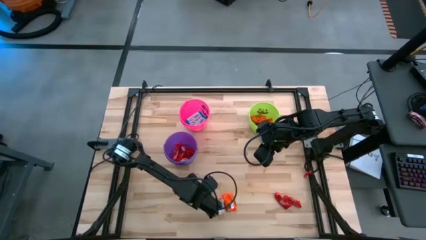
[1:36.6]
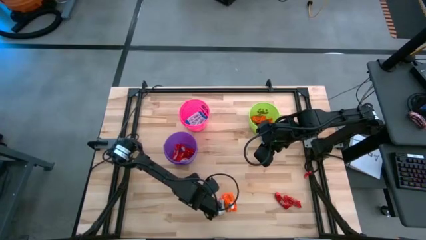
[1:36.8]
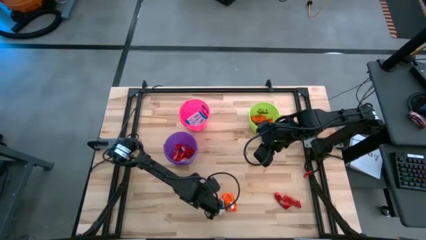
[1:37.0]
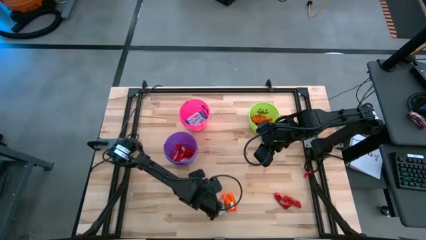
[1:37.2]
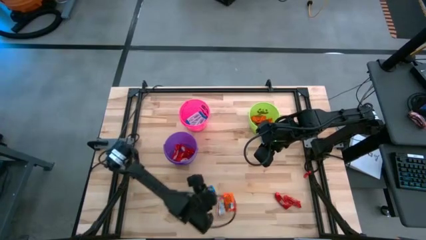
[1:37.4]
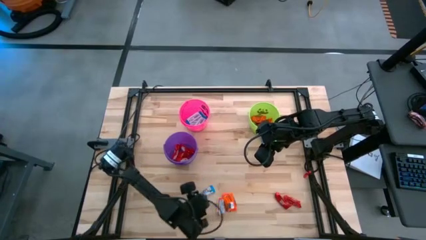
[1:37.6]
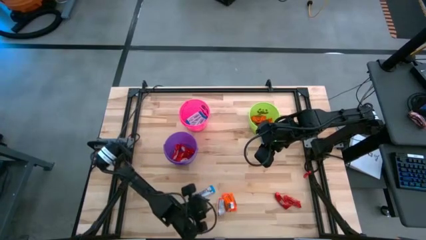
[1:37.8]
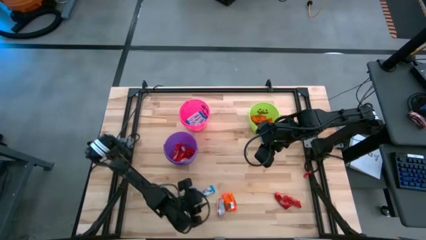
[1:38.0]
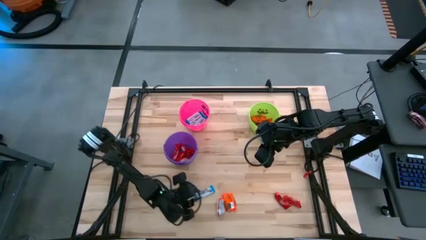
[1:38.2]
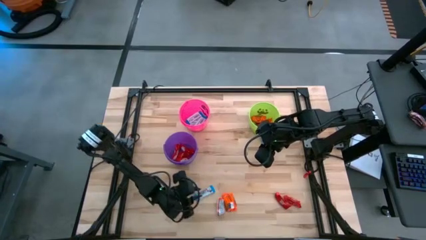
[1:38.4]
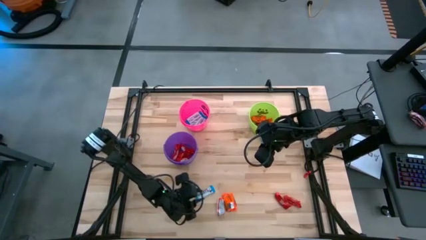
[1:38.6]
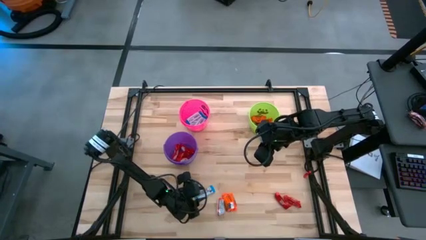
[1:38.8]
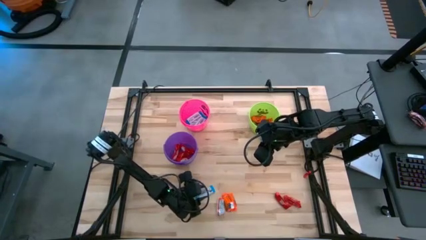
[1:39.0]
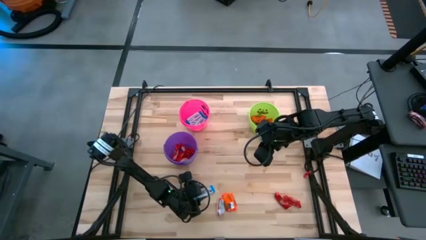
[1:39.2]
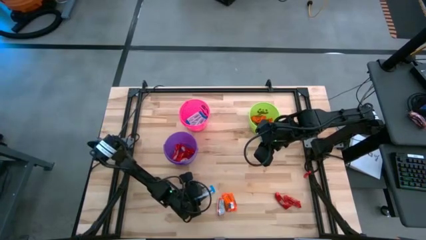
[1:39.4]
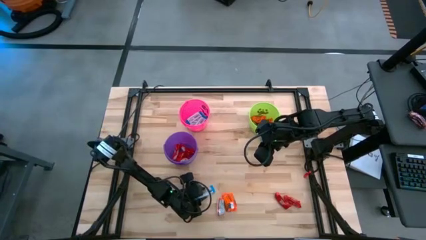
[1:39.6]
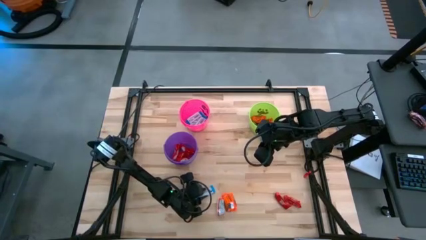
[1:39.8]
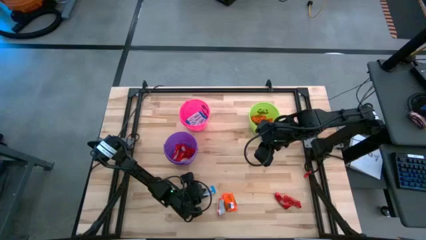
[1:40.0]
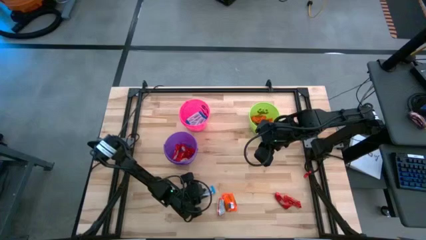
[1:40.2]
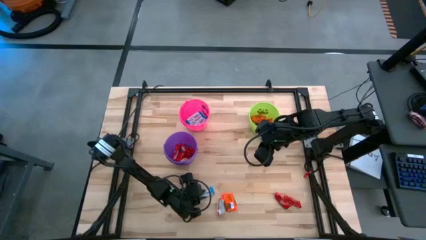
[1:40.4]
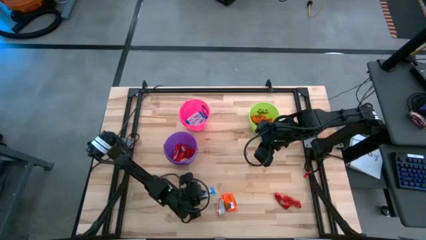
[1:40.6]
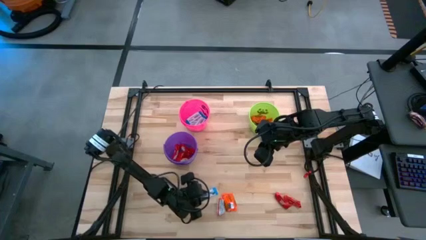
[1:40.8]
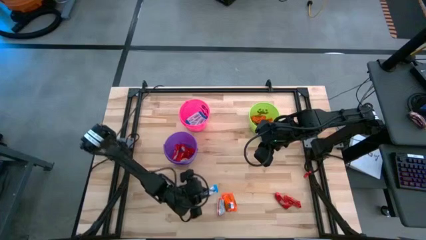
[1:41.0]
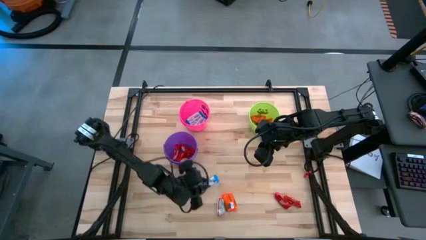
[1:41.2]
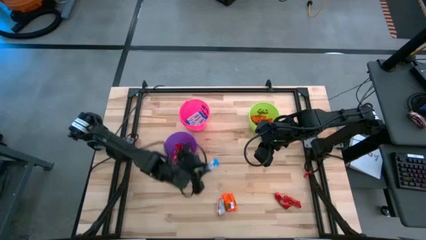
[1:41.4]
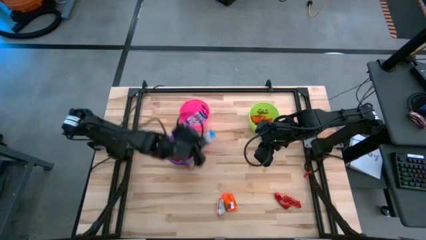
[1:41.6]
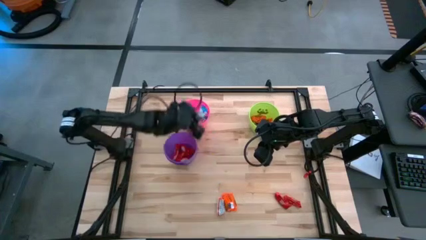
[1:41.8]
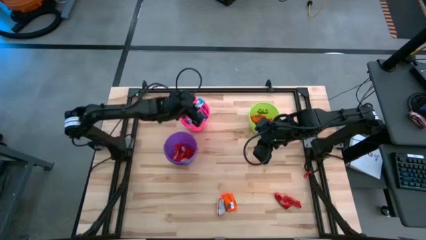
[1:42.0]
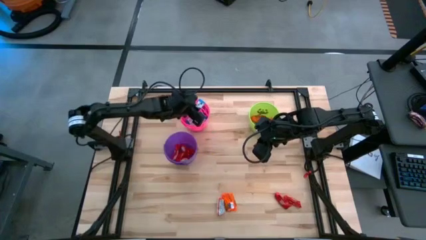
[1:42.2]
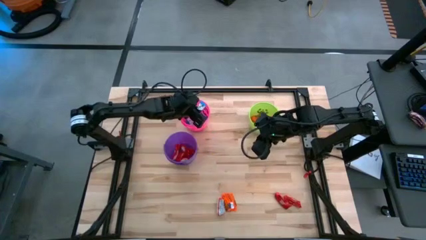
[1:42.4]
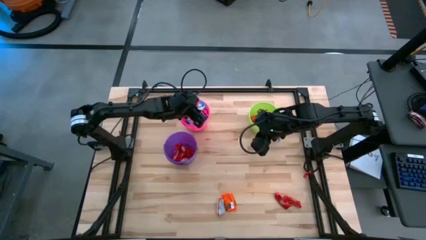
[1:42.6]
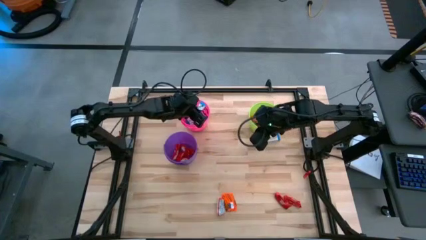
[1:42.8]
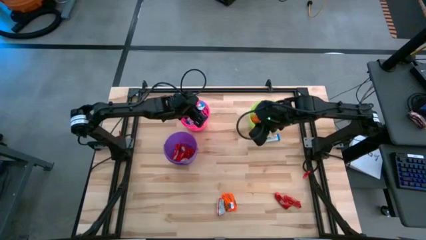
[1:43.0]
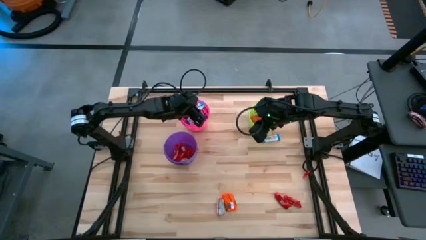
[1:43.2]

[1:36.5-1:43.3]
Task: Sort candy
Put the white chocolate into the pink bucket

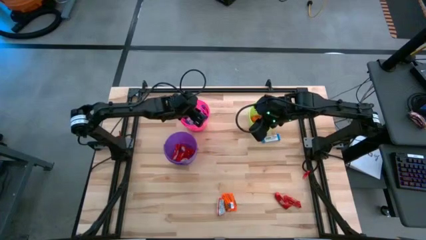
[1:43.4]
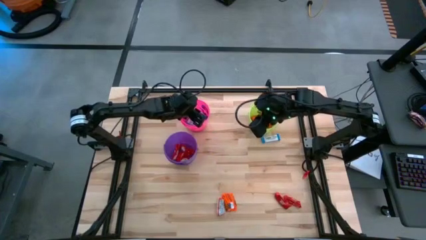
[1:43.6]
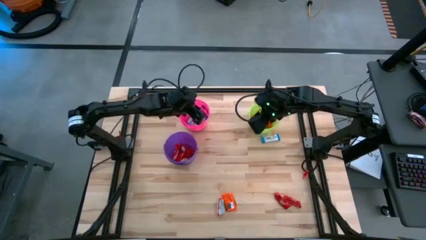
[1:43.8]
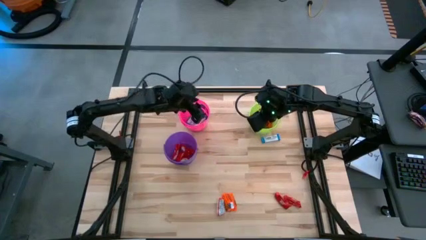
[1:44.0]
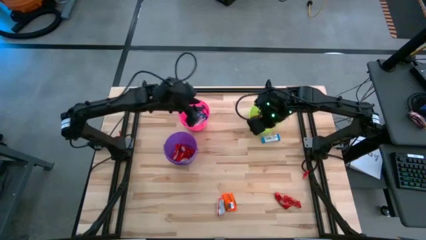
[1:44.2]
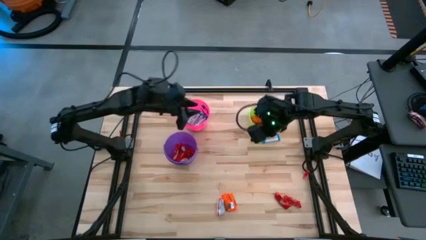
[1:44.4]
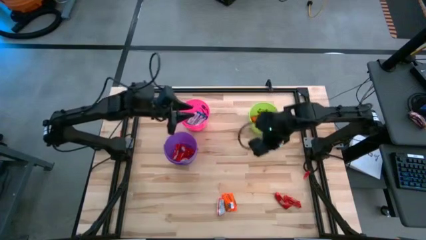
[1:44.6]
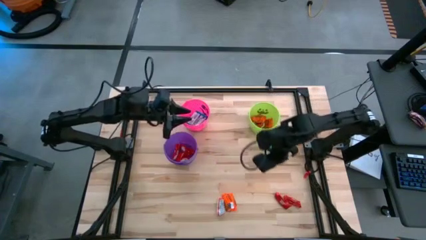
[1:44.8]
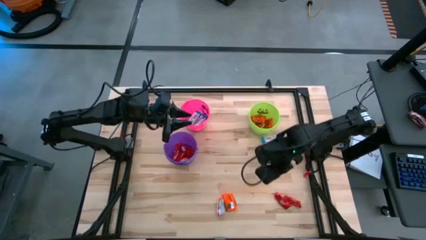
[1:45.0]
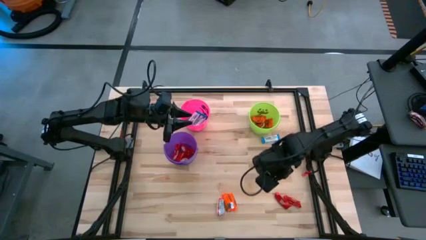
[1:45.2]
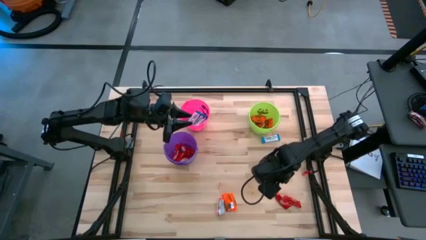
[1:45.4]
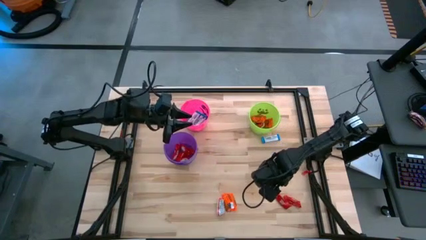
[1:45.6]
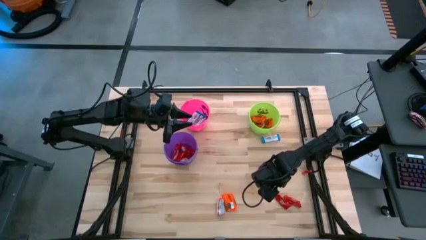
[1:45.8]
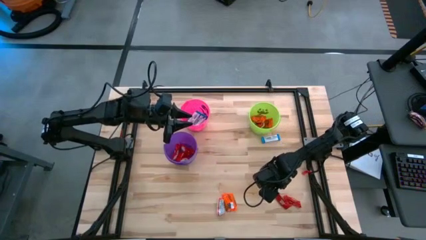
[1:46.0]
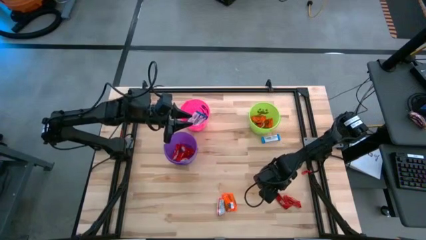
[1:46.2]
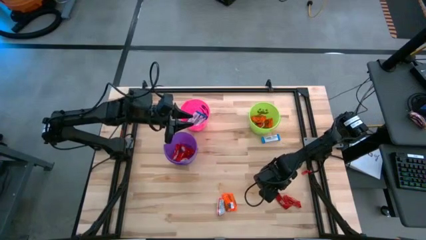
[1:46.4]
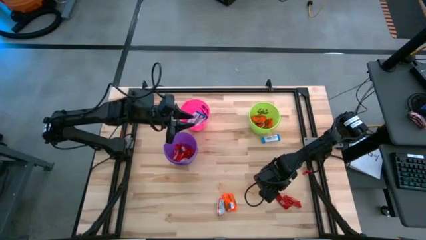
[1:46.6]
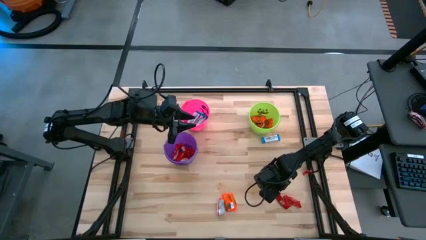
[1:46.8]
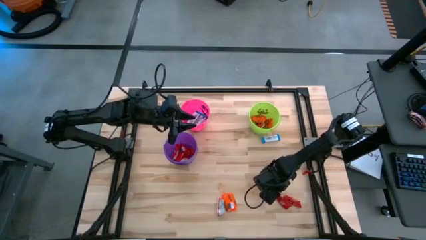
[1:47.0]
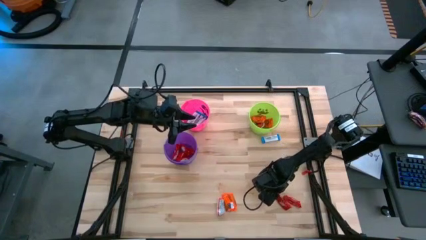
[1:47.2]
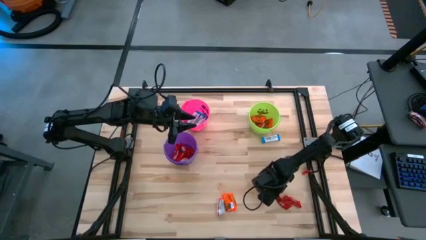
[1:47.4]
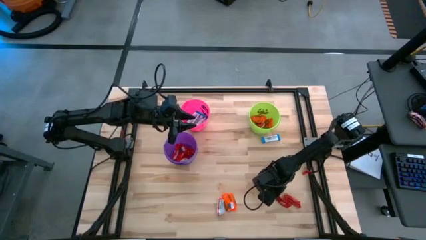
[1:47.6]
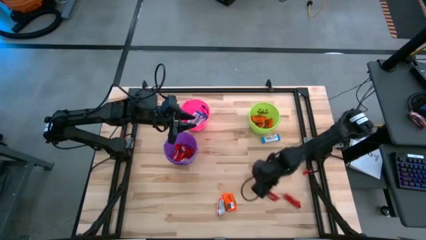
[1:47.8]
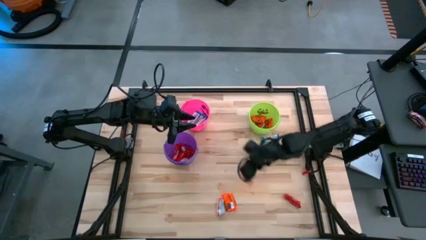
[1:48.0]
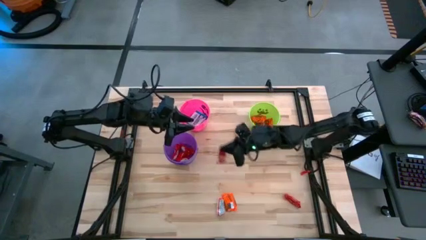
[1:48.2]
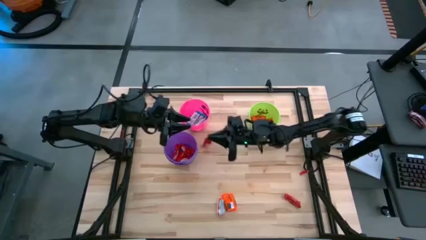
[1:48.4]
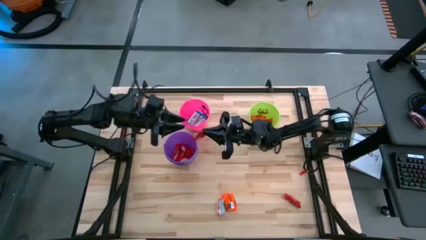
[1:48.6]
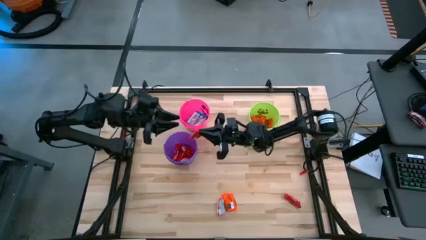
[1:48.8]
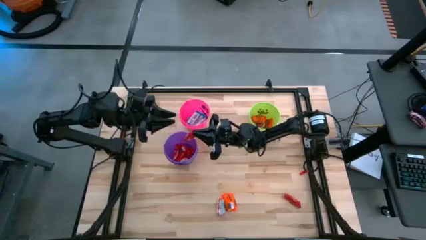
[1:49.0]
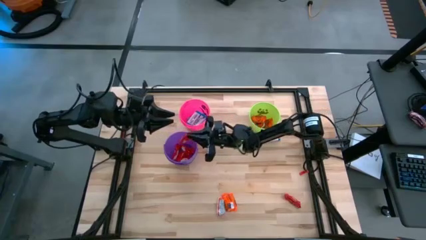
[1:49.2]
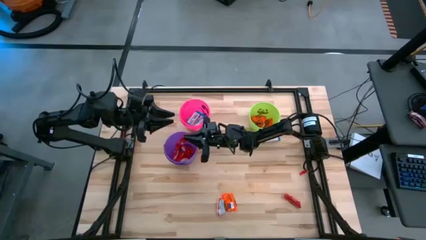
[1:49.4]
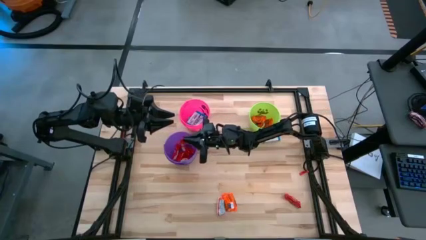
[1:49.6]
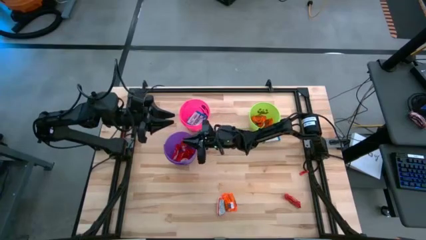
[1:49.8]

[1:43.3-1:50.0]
Put the red chocolate into the purple bucket

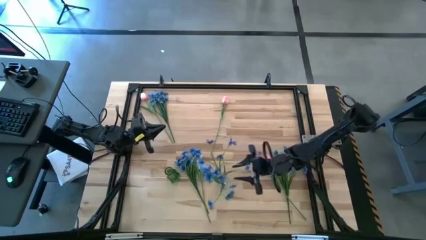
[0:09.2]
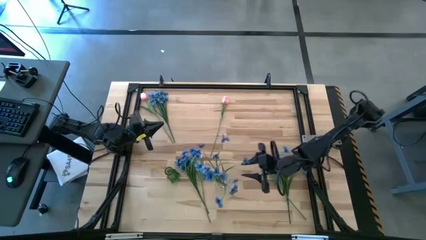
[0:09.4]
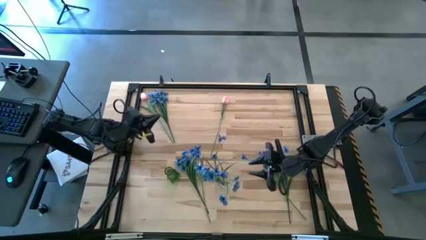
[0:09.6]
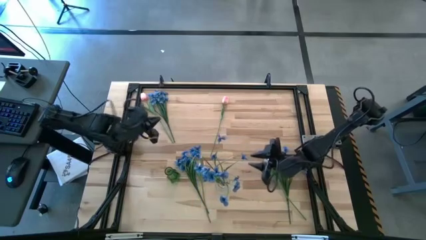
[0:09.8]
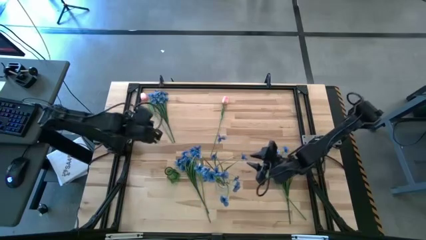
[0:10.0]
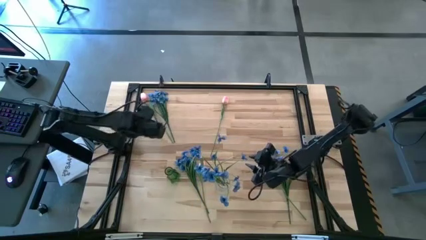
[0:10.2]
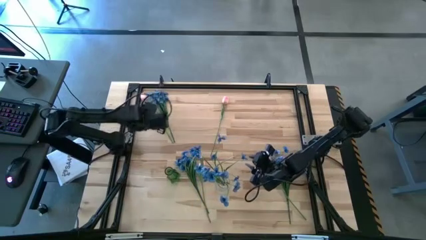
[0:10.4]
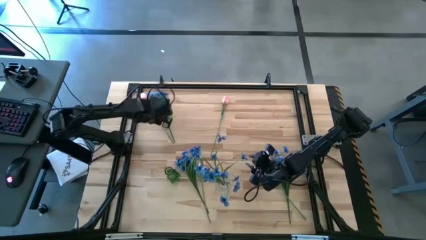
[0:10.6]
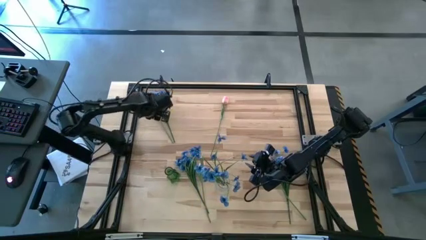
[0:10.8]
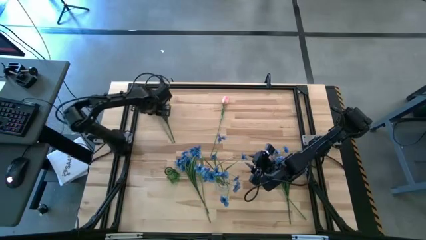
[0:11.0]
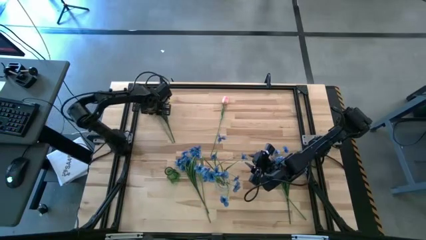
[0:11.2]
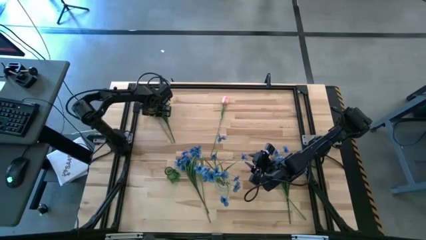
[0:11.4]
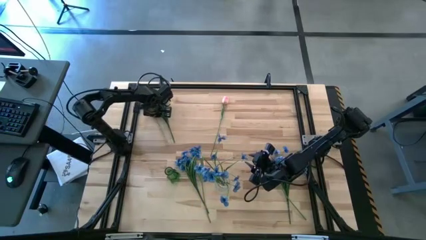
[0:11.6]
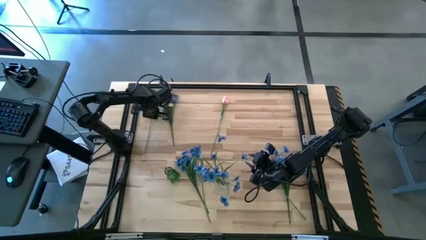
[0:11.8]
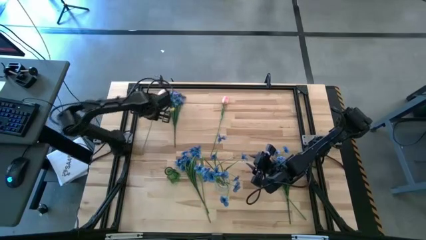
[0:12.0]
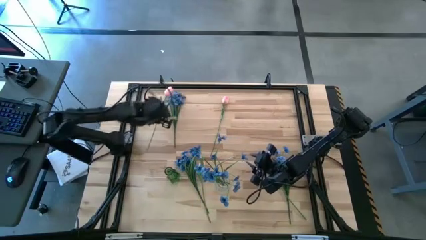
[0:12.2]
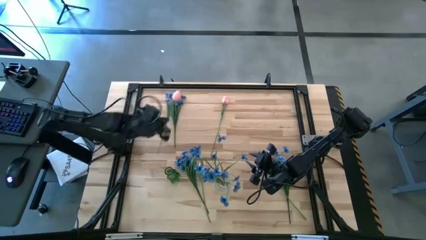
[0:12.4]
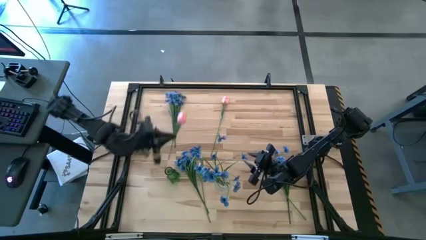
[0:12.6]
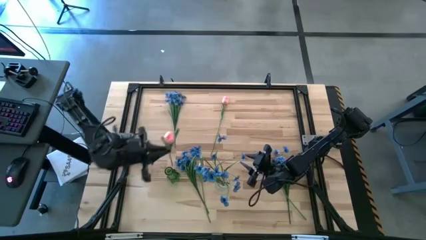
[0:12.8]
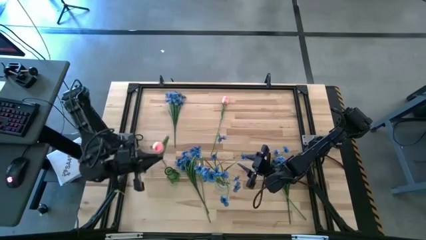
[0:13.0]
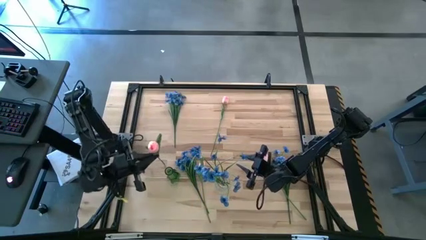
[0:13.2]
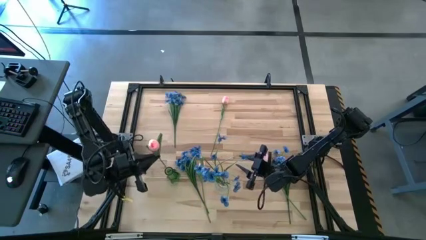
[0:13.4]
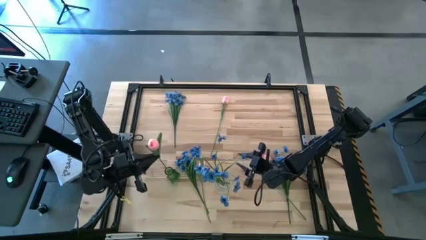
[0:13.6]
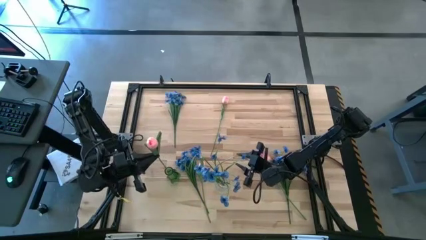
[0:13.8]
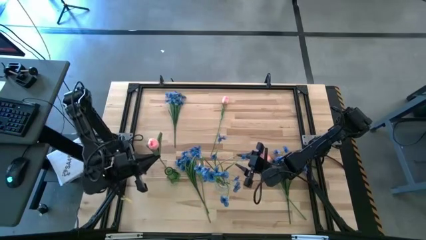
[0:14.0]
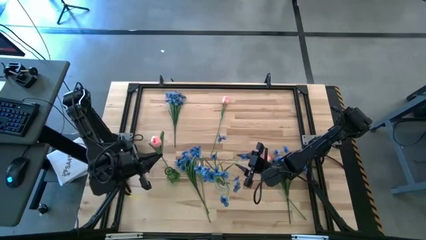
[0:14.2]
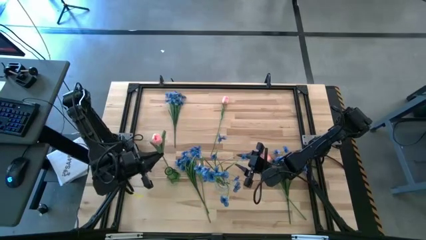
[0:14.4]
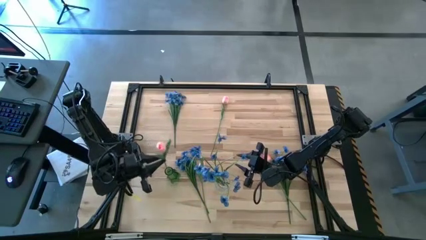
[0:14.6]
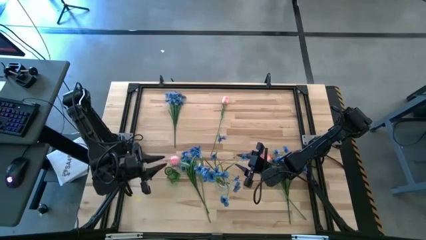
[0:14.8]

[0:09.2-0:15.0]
Task: Sort flowers into vase by color
Put the top left pink flower into the green vase
